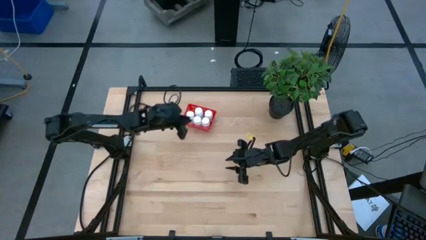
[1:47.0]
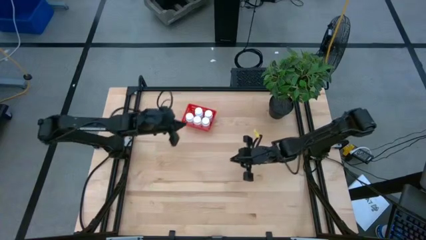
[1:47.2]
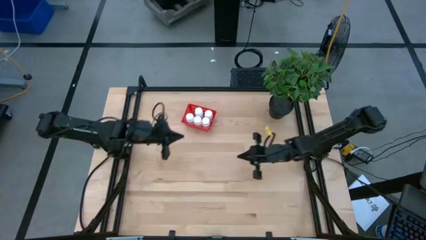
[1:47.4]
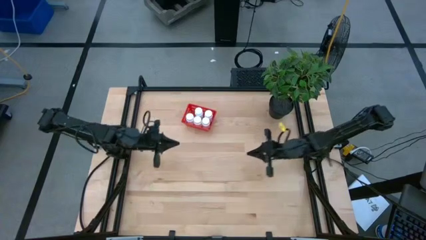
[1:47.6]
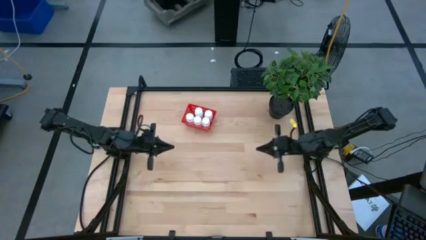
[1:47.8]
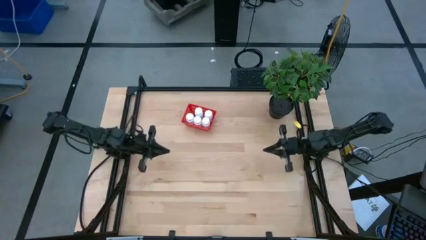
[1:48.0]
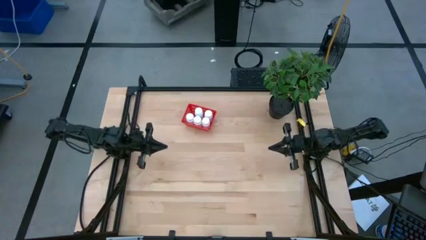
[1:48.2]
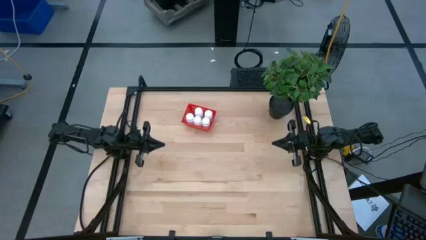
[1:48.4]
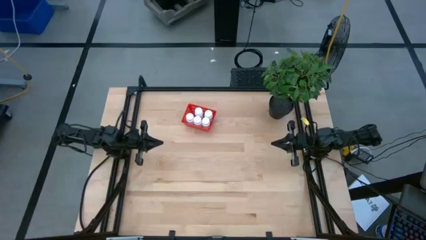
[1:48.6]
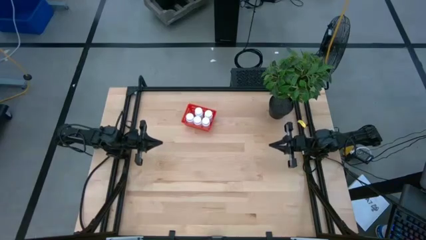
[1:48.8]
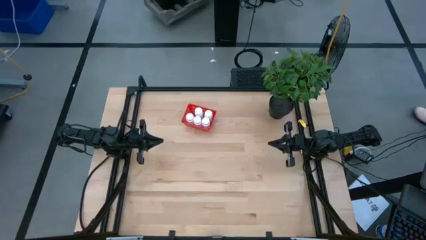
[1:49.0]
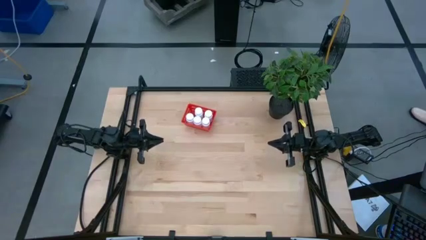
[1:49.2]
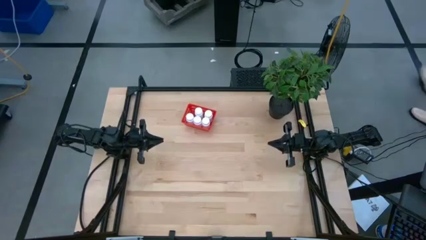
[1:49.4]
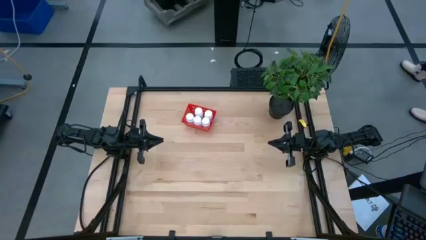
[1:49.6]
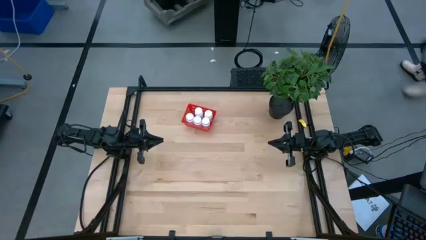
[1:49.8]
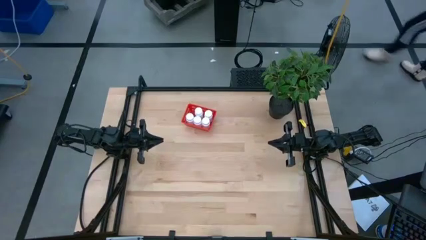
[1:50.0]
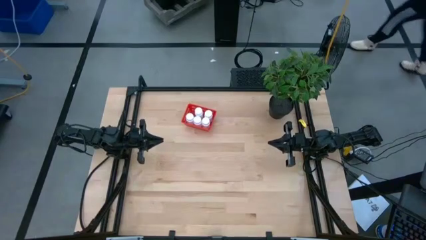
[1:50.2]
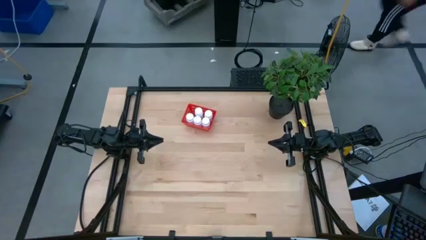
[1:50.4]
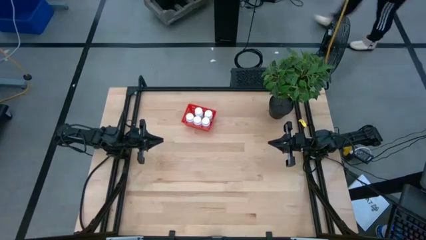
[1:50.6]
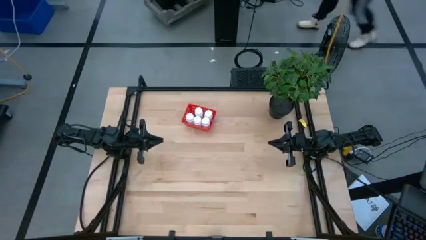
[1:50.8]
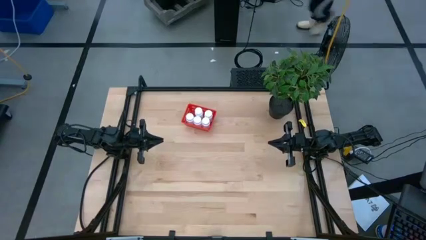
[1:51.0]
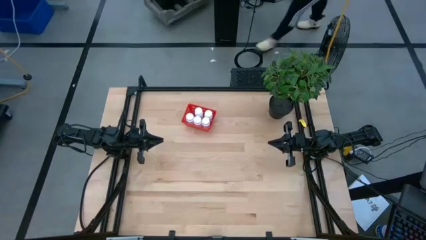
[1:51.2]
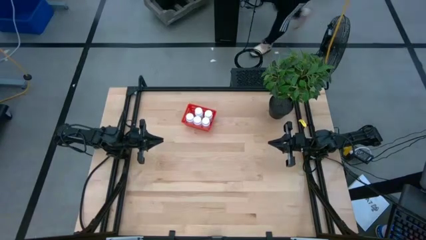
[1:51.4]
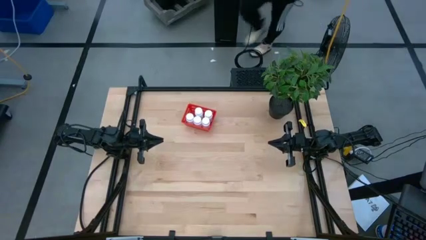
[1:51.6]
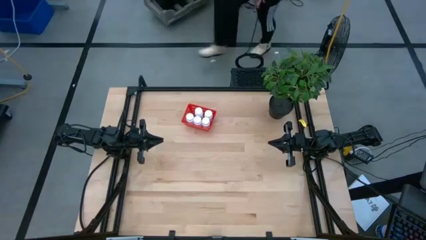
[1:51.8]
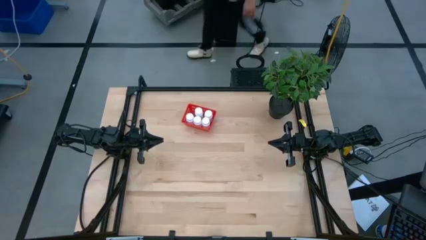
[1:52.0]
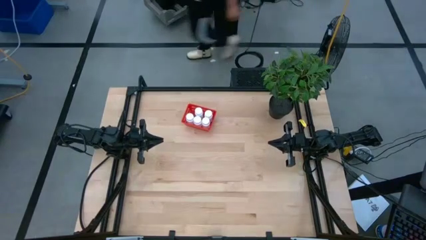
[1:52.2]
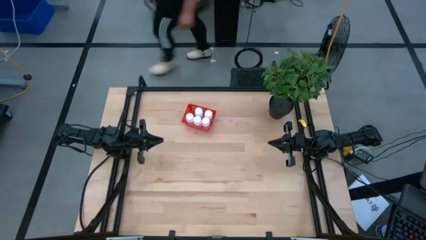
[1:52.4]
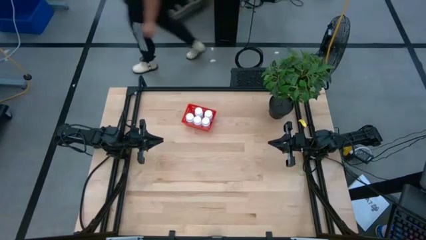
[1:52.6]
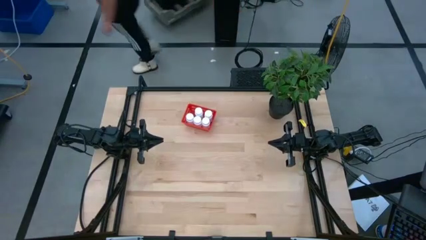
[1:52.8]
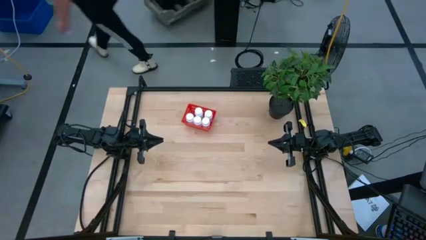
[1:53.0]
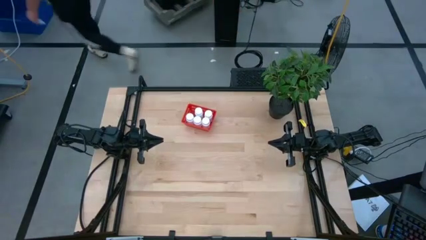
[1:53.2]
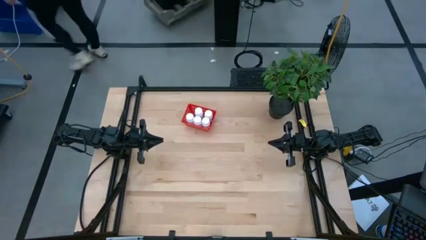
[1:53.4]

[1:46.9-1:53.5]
Task: Pick and place pill bottles into a basket
Return to Home Position

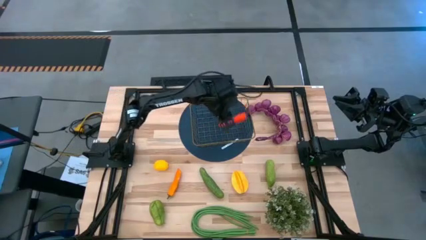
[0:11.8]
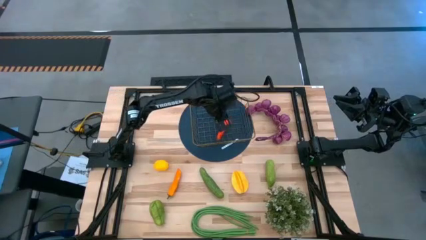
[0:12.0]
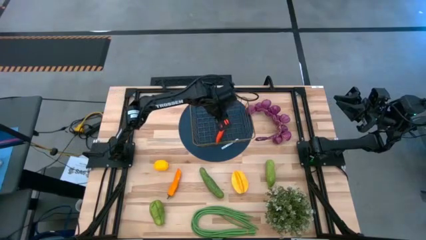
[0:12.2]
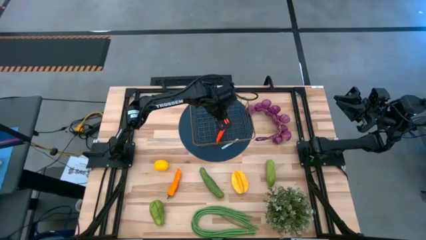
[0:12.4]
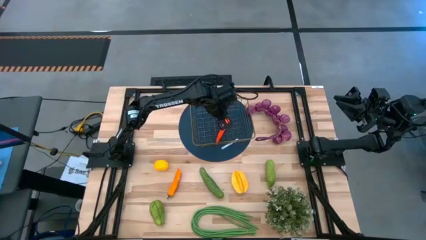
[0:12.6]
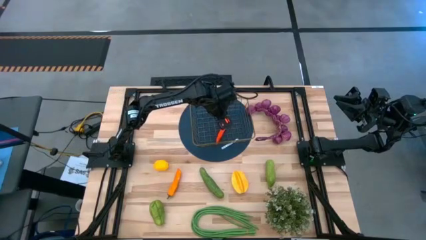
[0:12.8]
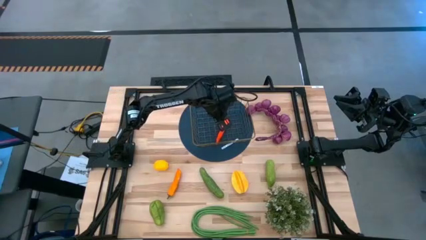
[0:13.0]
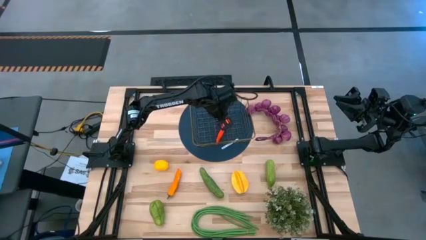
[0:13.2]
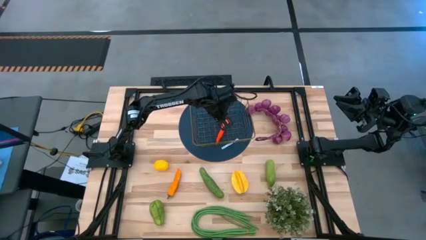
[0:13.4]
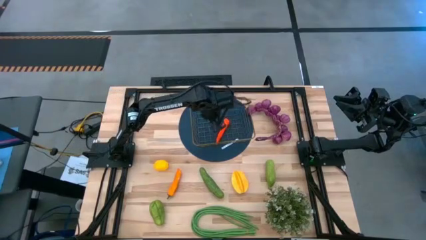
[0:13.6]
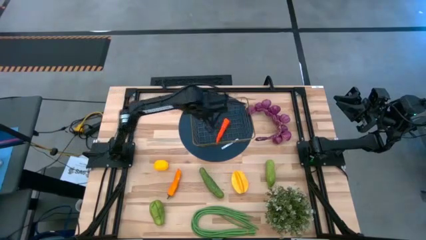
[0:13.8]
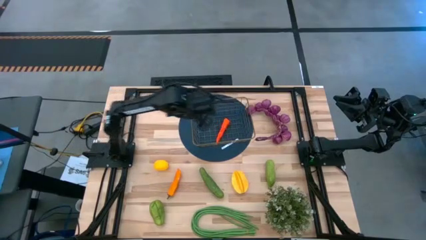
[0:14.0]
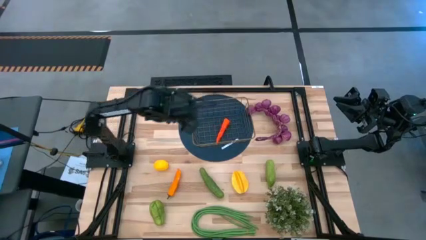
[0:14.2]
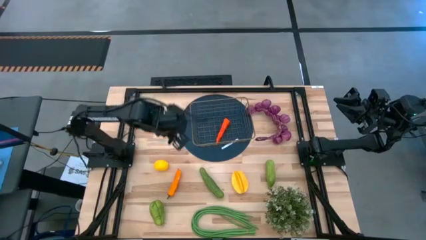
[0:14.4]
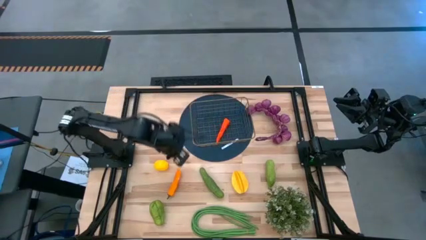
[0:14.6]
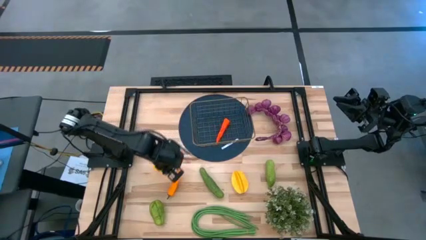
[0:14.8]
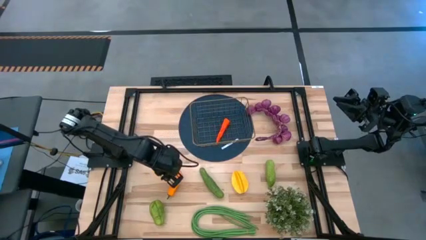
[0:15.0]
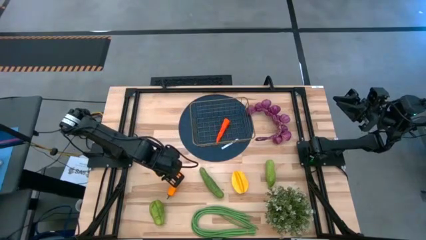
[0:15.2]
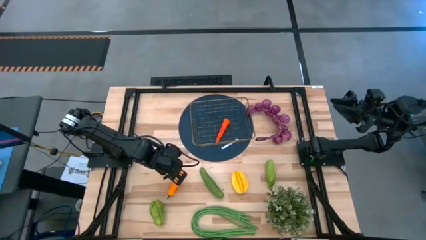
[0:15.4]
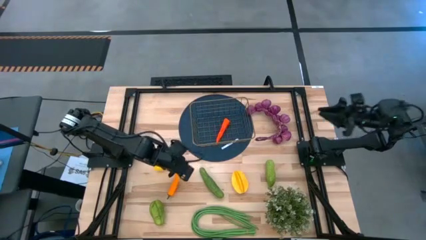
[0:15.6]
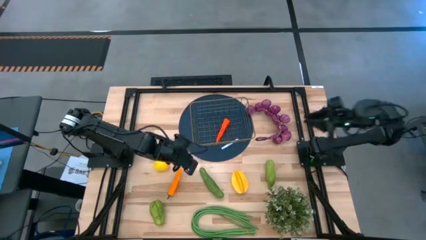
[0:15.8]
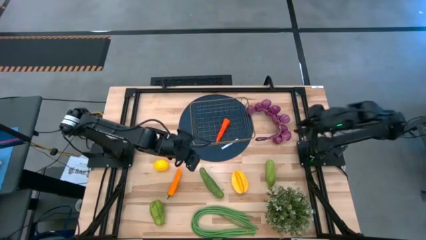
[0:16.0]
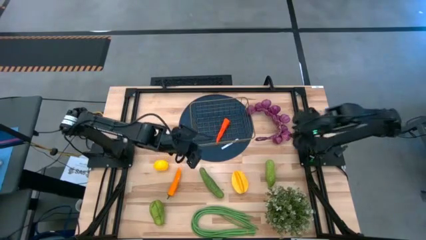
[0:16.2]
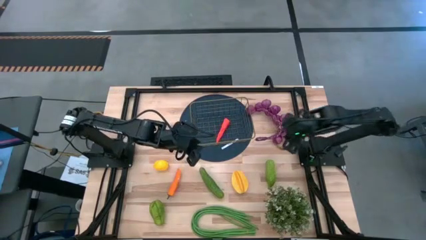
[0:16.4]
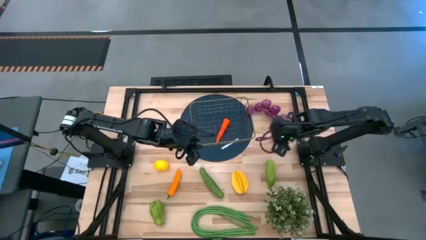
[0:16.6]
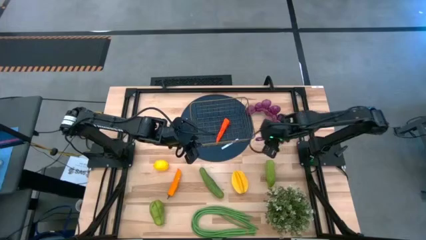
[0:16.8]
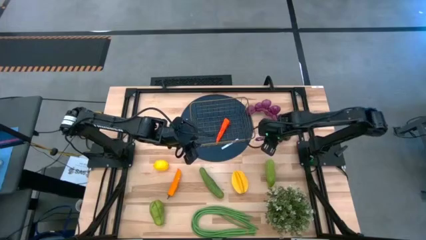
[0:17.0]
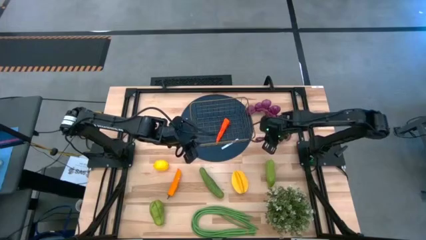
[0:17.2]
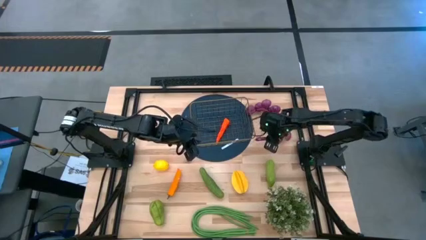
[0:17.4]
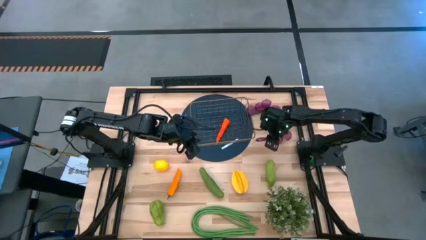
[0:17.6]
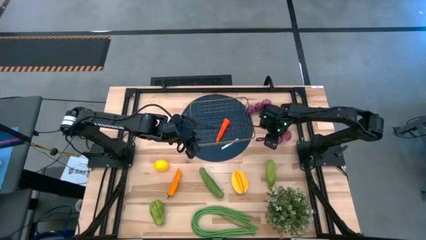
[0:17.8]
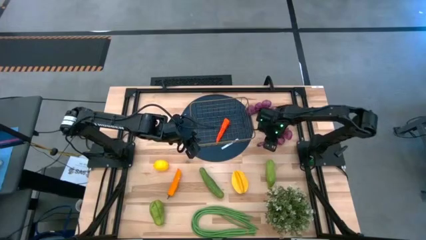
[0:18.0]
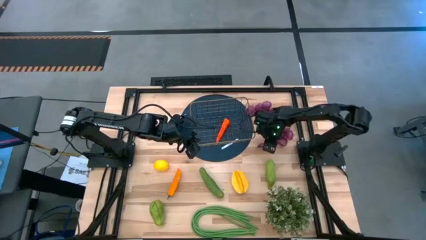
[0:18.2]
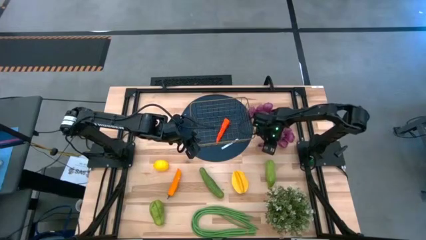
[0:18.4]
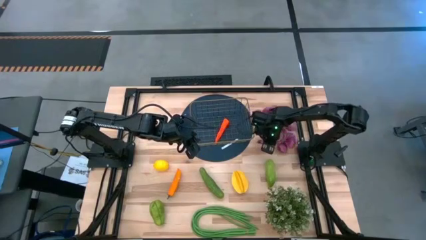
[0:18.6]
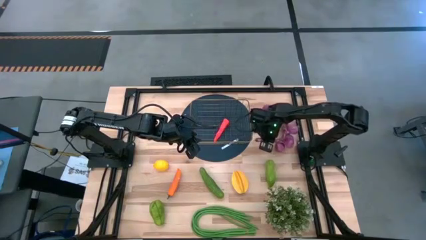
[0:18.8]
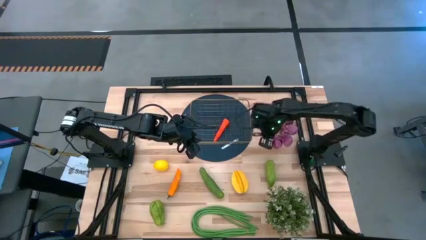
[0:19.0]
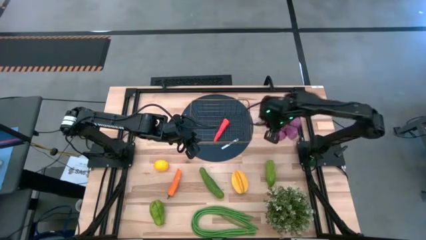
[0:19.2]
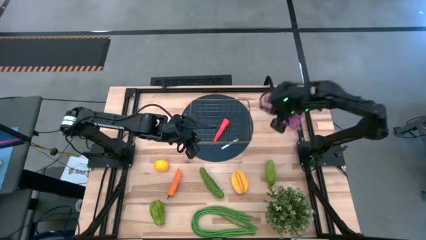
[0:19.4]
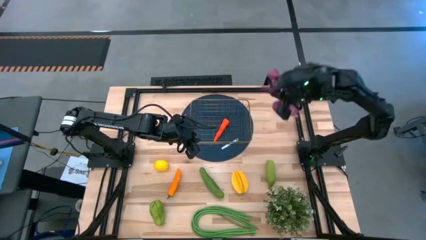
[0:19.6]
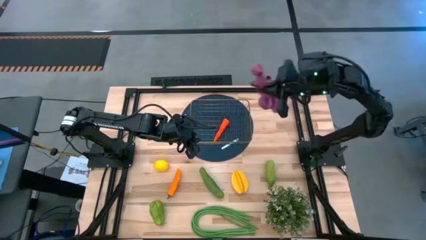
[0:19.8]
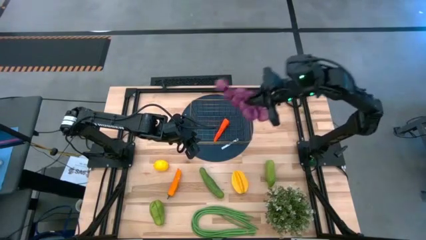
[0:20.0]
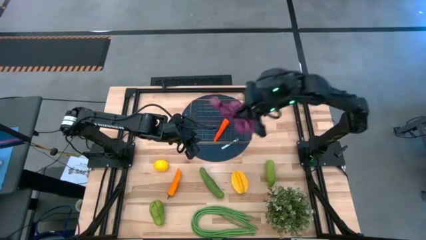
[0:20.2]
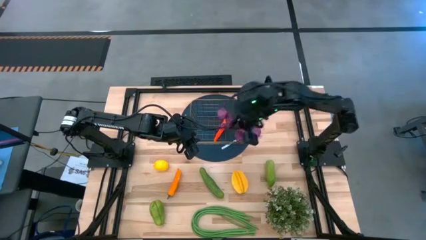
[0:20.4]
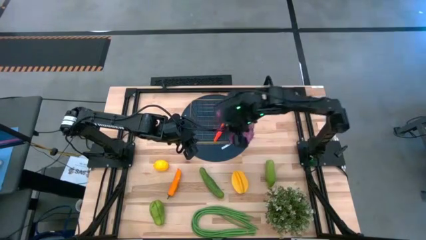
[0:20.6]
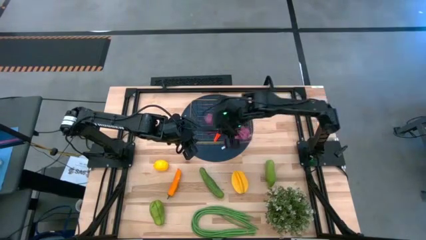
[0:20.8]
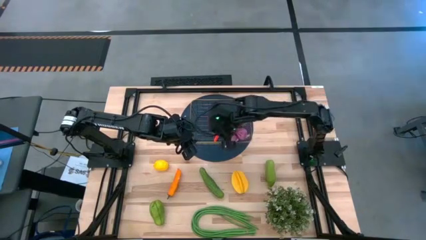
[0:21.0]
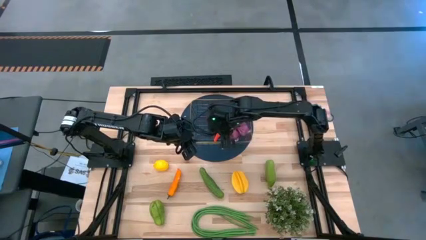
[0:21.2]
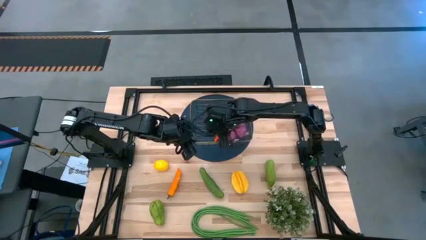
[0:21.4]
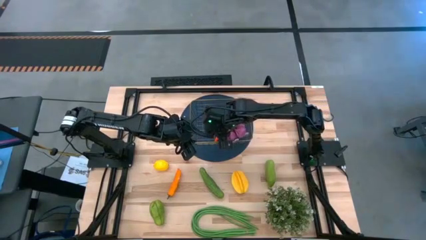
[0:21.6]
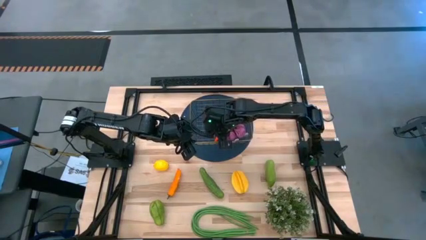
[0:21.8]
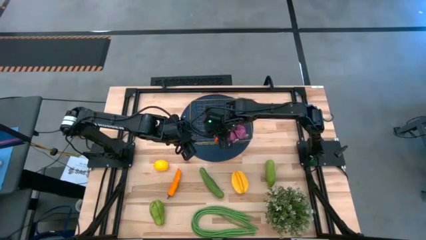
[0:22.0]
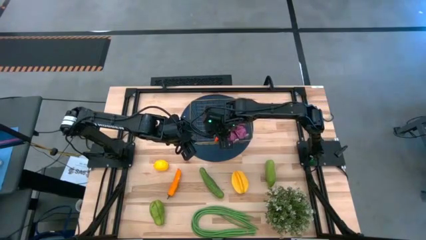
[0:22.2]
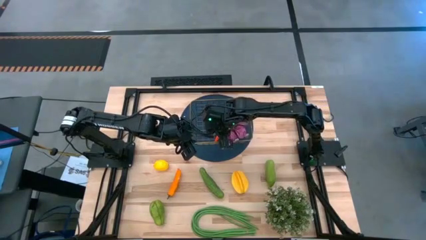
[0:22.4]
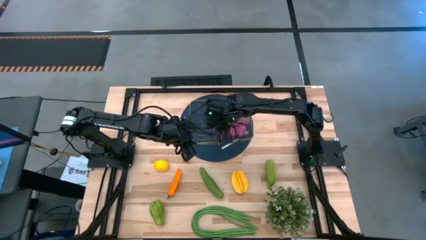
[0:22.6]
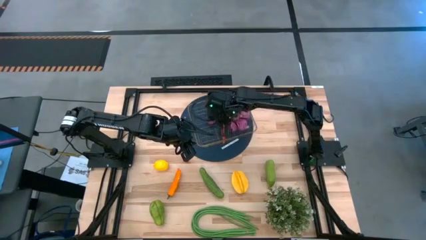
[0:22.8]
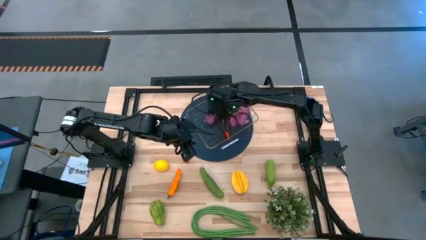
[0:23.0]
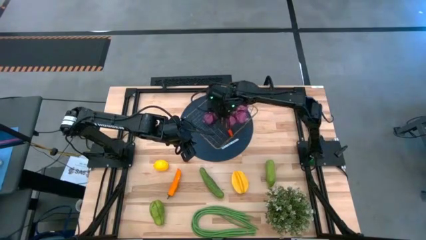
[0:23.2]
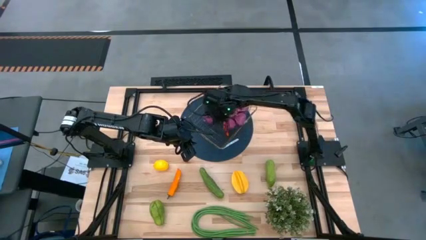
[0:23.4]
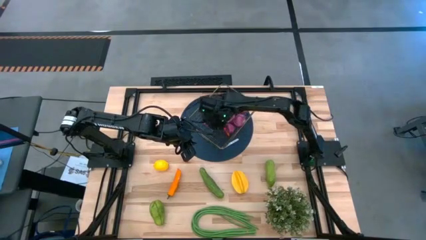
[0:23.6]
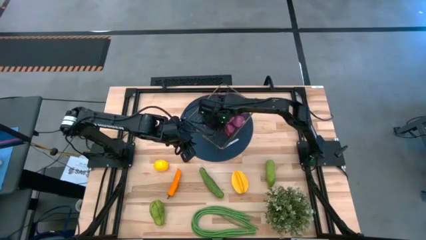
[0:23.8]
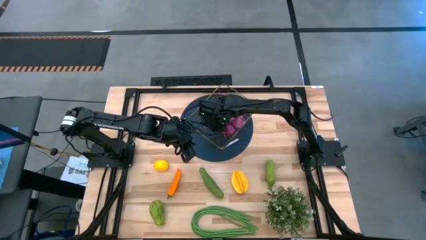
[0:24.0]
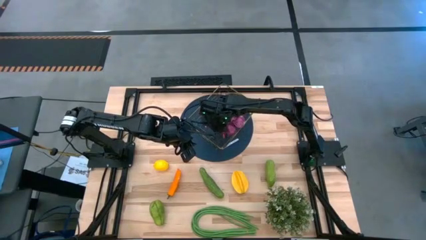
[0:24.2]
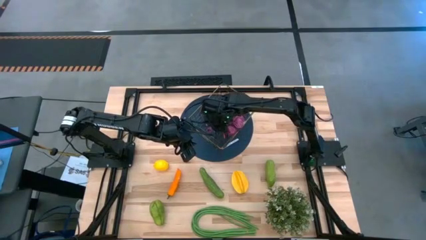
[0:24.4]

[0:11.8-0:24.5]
Task: Build produce basket
Put the garlic into the wire basket
